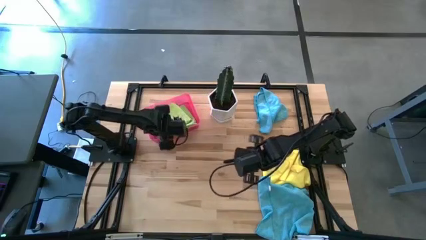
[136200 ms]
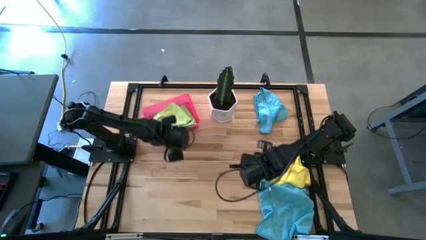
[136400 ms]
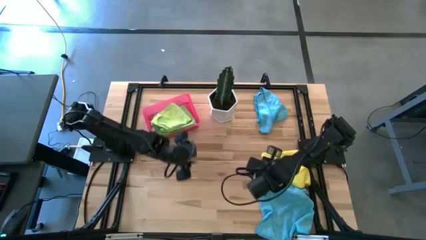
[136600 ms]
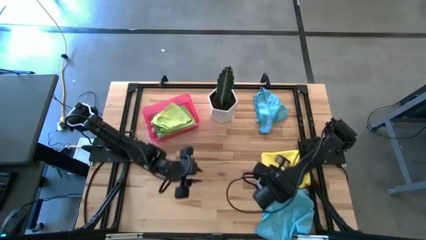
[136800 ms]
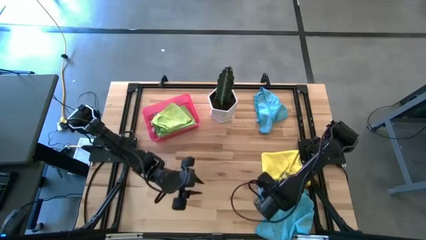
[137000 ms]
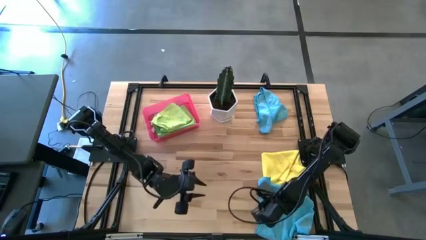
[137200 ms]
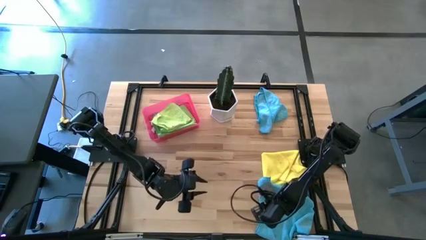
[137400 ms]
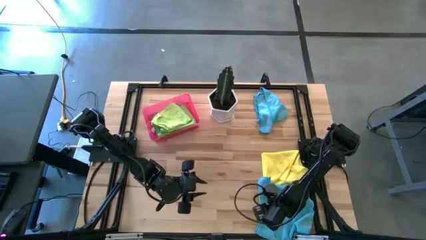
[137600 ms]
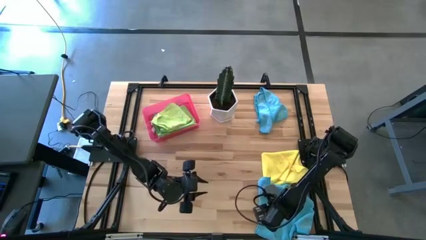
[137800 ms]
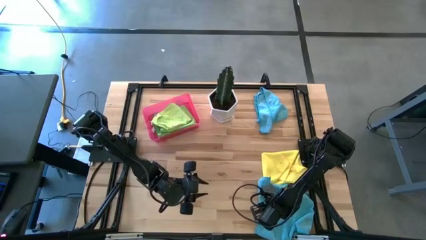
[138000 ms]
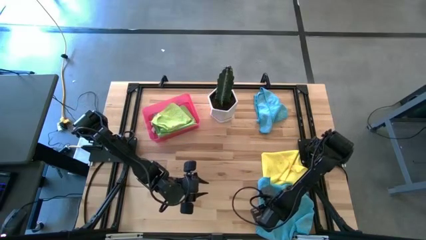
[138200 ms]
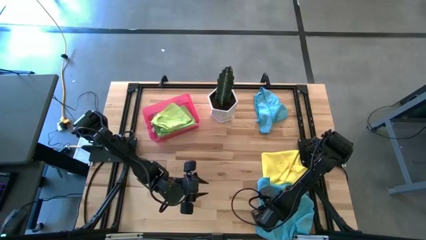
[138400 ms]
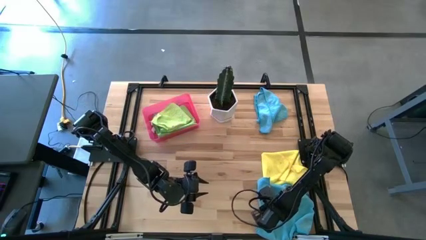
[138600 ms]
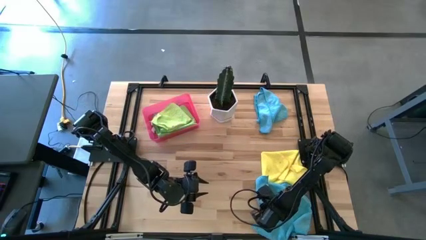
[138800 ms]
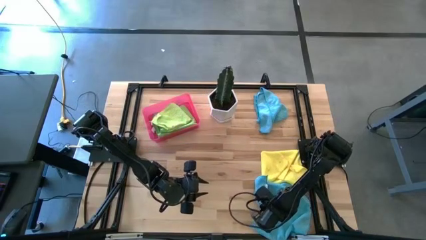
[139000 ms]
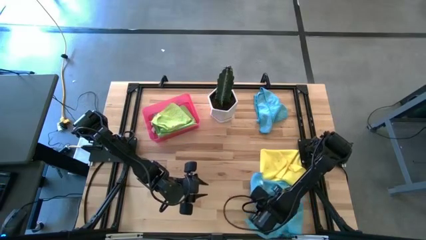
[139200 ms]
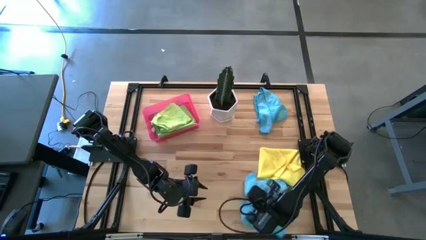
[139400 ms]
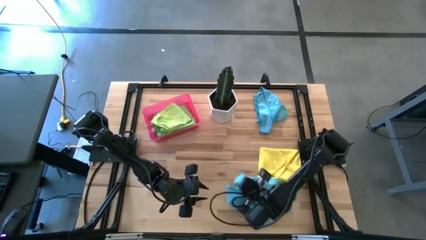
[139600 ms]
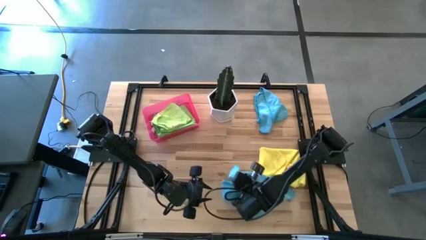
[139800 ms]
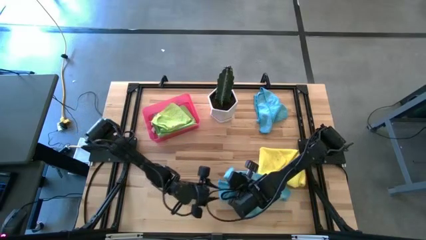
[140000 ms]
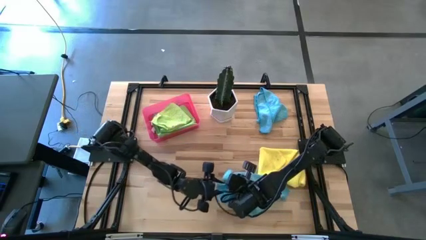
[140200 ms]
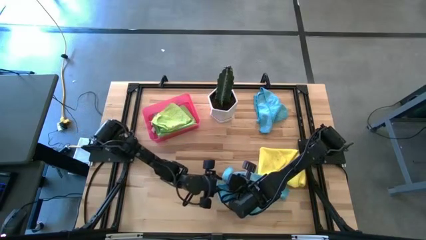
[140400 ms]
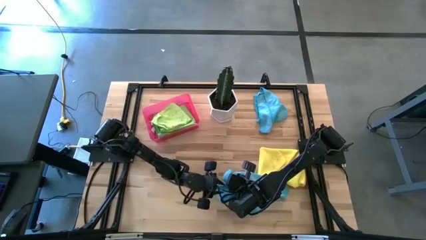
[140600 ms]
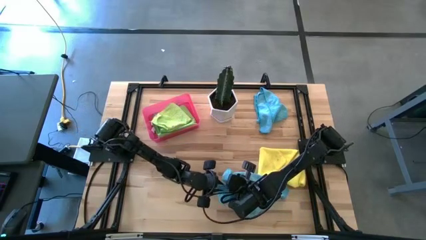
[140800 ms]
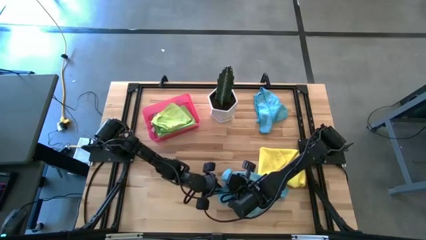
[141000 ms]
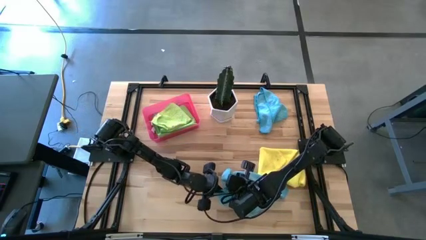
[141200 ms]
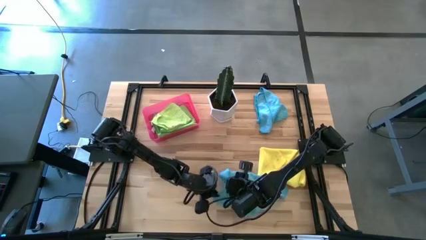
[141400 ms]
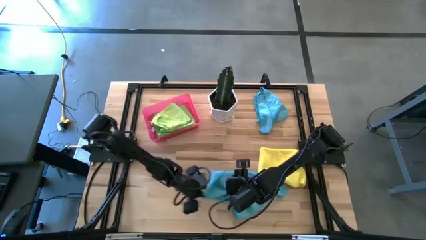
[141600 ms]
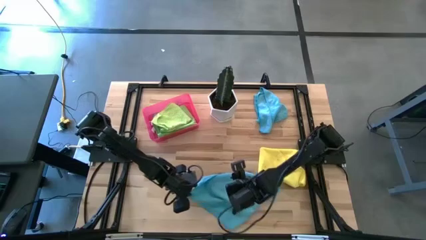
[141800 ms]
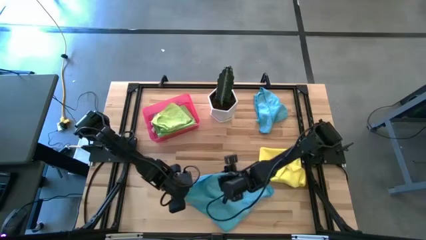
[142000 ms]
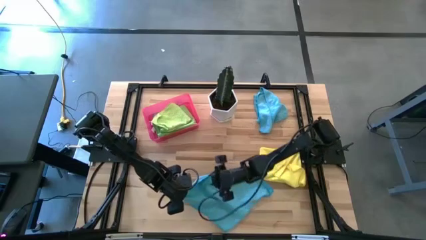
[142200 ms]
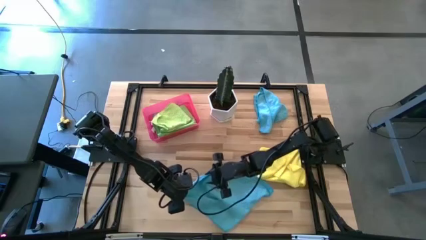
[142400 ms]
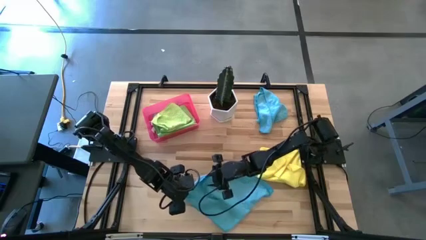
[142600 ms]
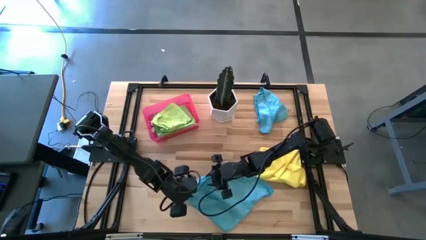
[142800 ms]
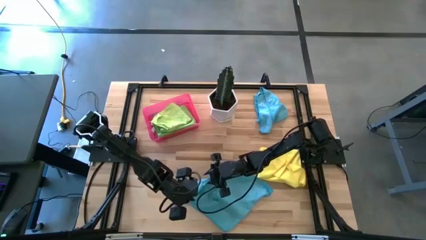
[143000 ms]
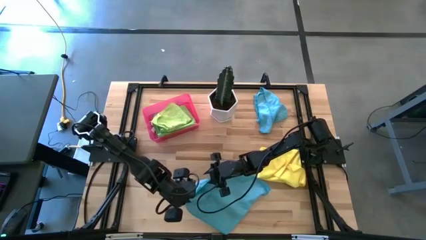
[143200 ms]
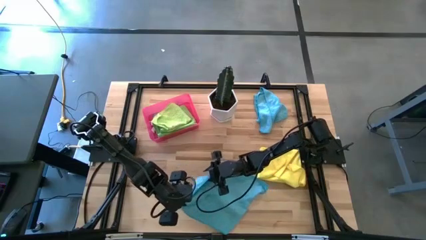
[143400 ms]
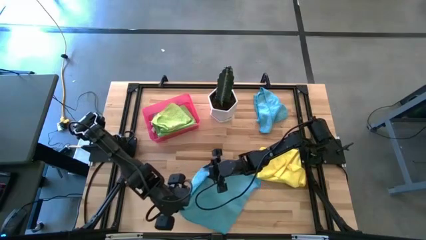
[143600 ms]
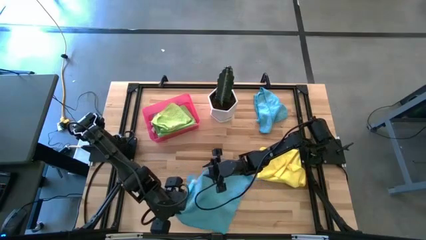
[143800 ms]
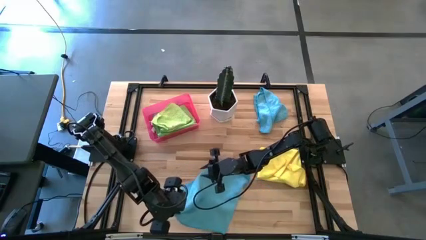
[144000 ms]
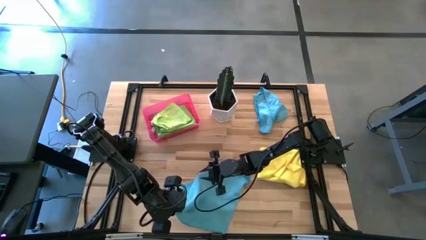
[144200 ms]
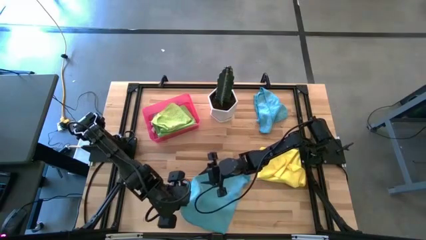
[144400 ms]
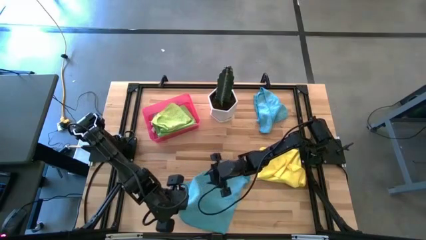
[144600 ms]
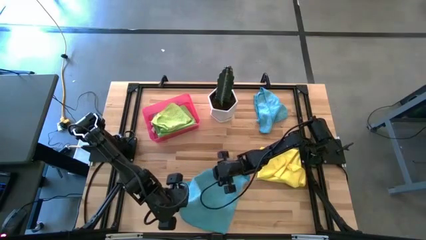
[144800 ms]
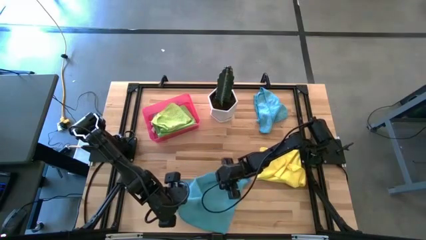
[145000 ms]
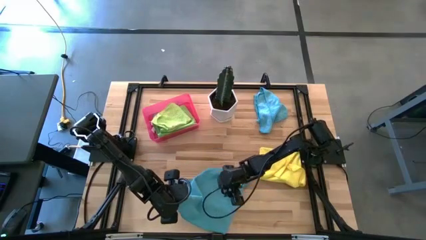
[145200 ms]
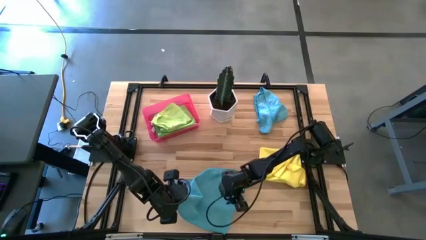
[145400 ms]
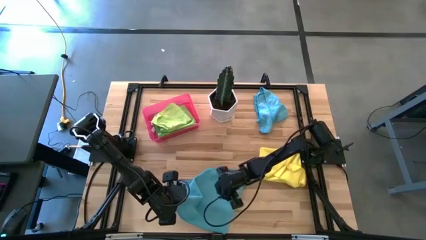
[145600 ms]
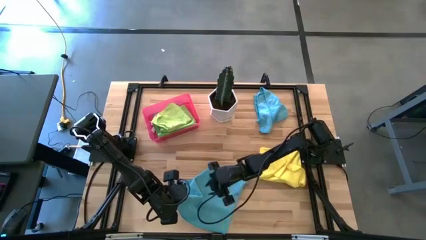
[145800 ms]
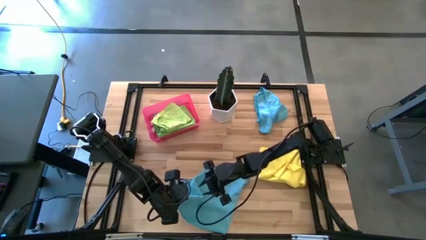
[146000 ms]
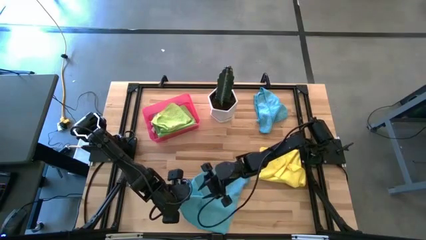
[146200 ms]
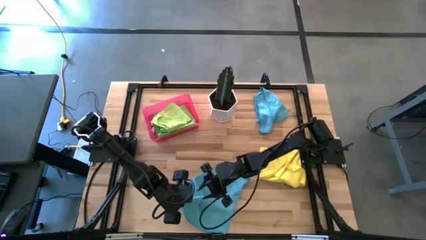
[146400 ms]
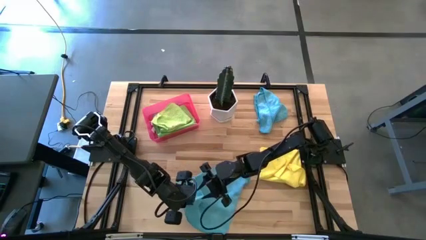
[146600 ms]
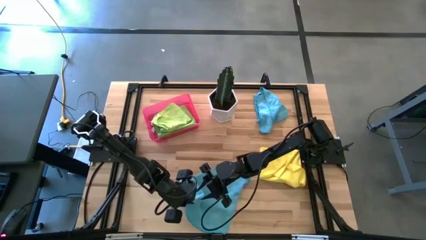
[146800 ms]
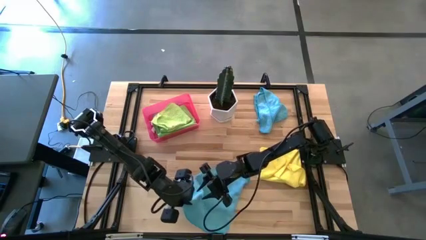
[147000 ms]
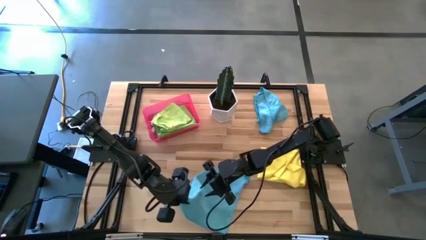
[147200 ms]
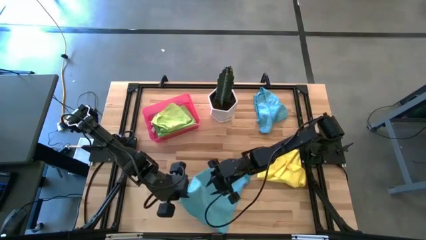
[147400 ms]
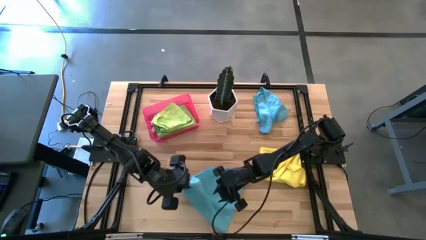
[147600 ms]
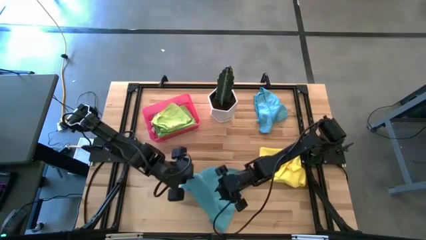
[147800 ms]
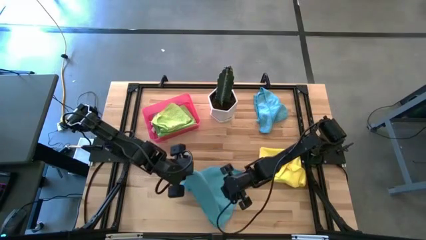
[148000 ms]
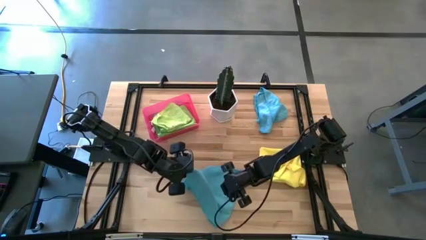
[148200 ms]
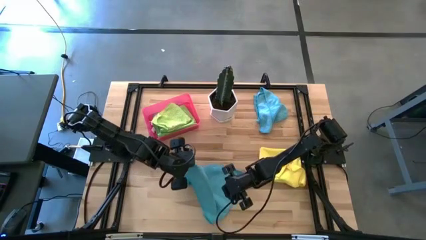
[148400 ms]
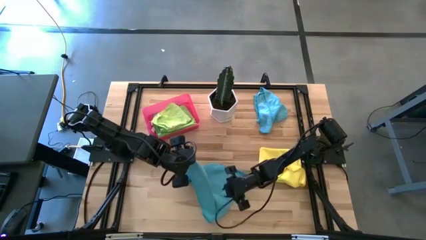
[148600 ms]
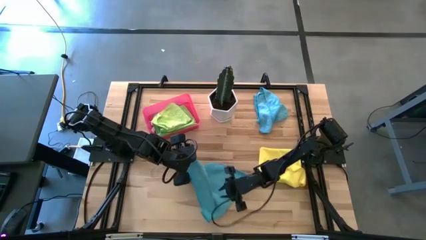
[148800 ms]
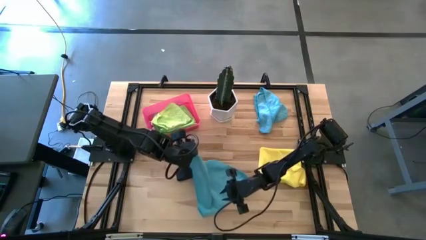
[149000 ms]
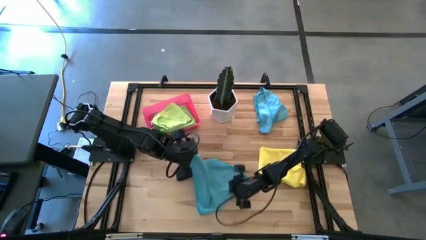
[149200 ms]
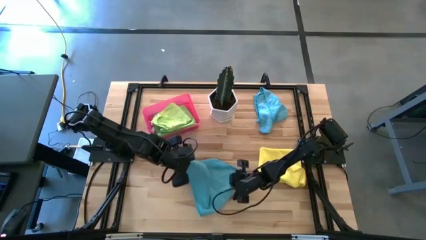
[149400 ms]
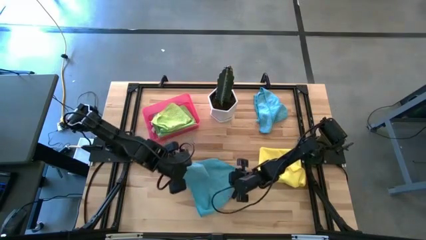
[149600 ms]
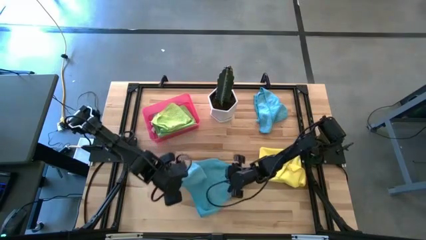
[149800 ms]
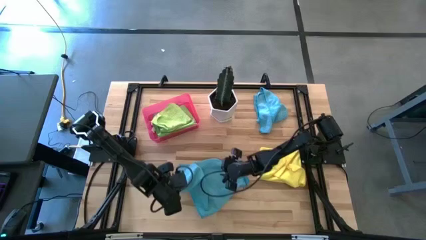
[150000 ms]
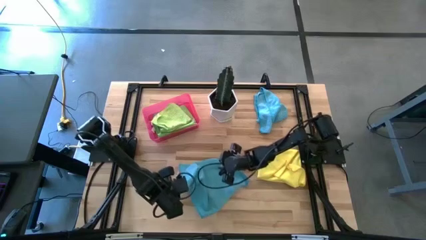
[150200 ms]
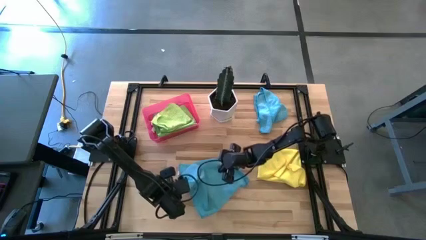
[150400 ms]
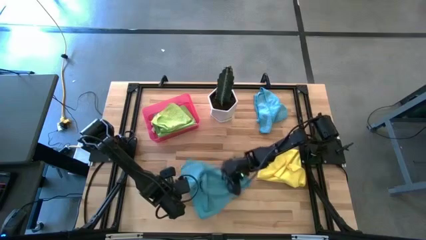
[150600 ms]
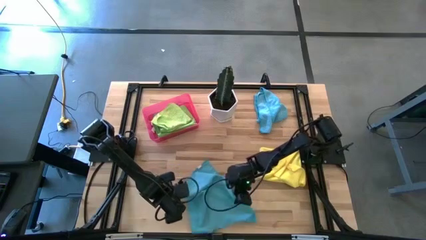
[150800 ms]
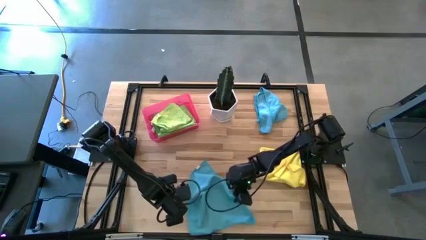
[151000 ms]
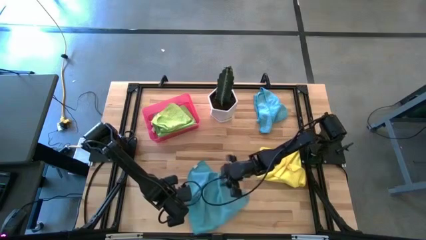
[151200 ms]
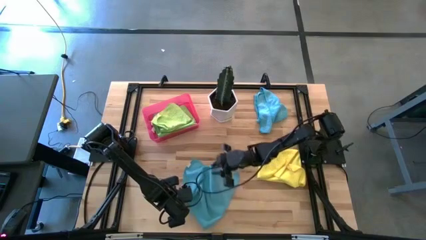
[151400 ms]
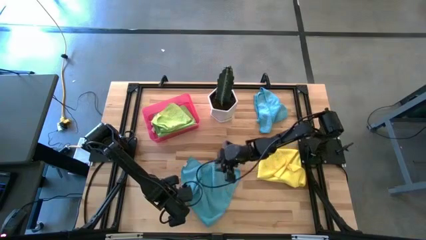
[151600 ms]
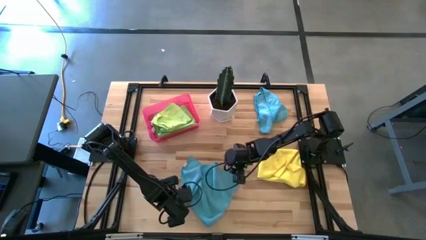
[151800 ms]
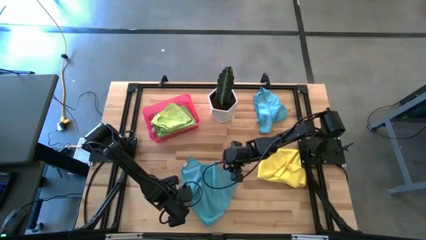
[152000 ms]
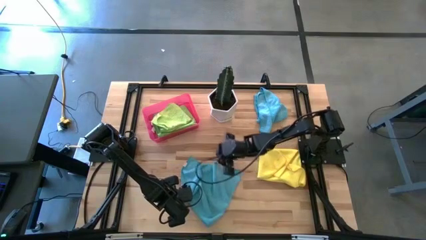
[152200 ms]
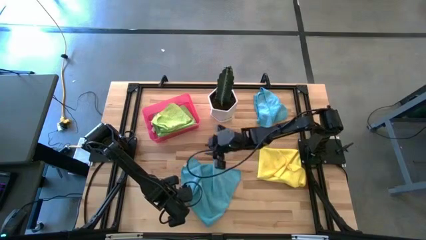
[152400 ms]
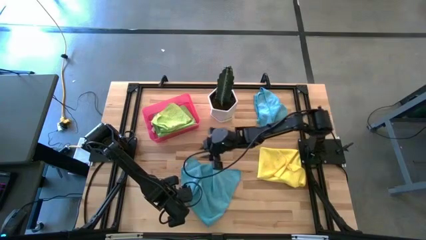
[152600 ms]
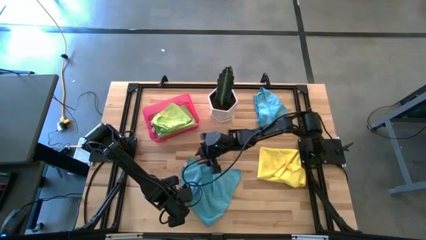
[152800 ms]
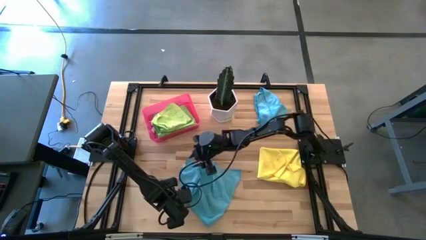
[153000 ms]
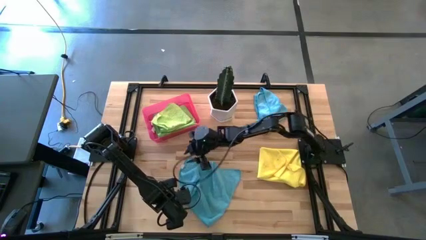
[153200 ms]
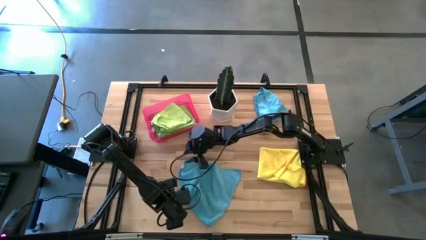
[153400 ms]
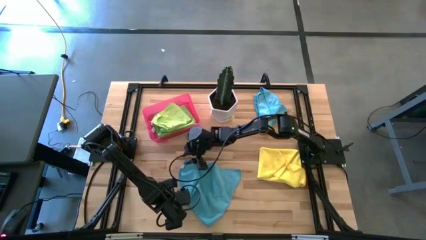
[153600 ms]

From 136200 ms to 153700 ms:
Task: Fold microfiber towels
Fold the bottom blue microfiber cloth
